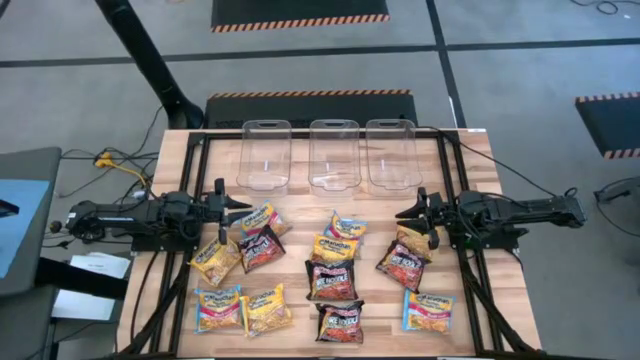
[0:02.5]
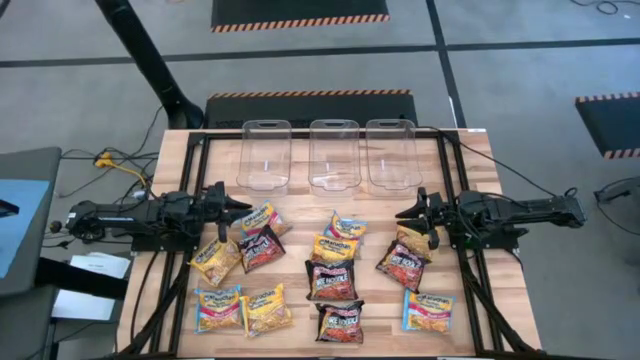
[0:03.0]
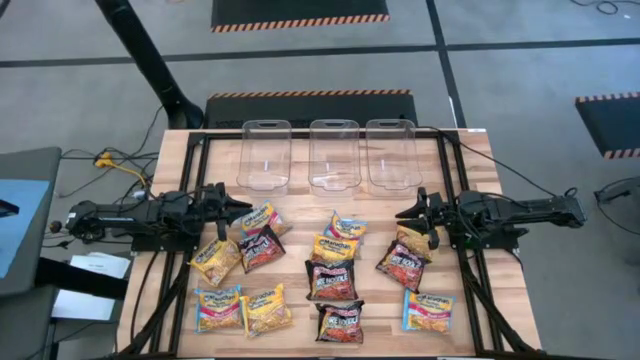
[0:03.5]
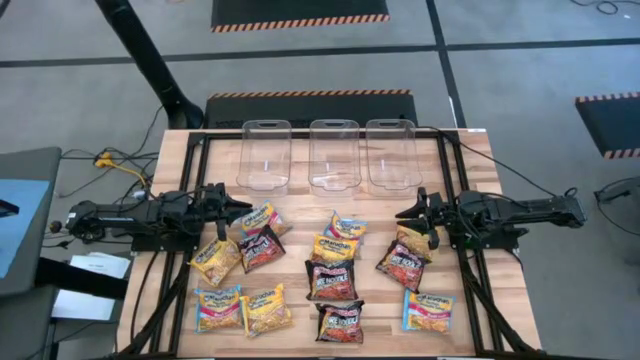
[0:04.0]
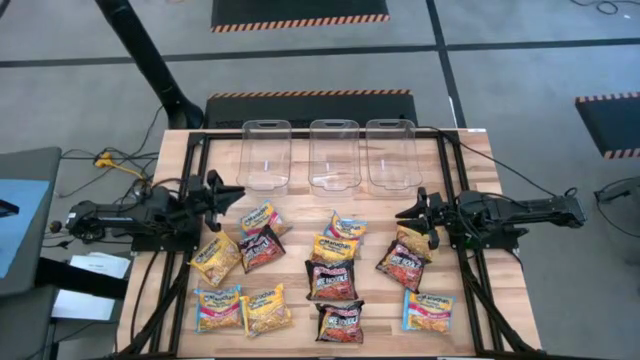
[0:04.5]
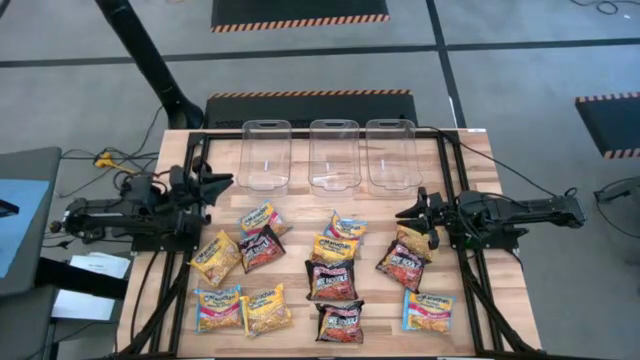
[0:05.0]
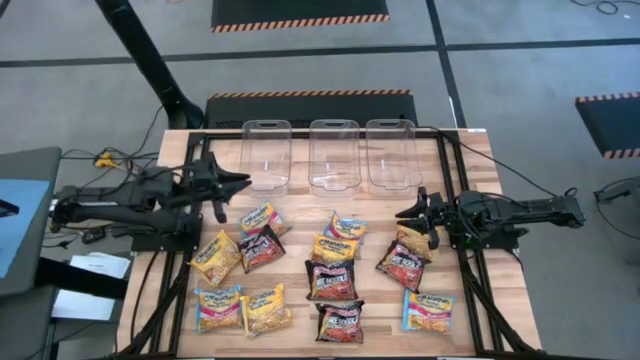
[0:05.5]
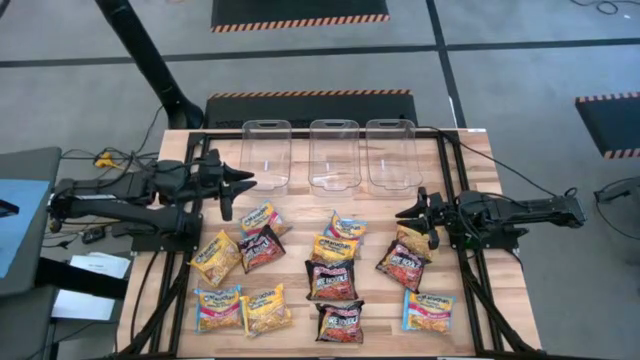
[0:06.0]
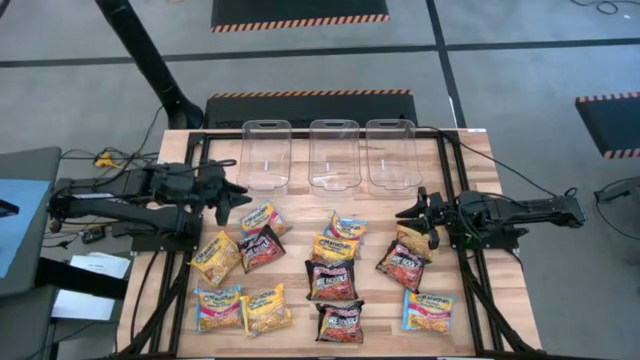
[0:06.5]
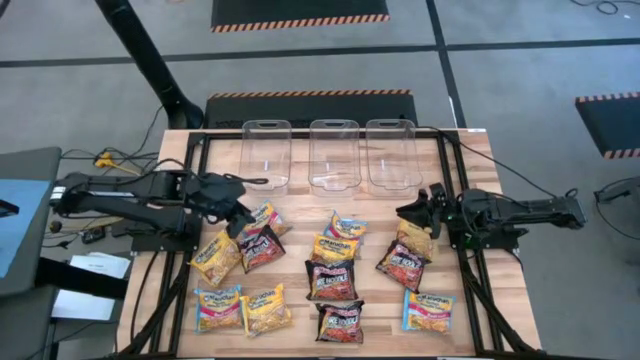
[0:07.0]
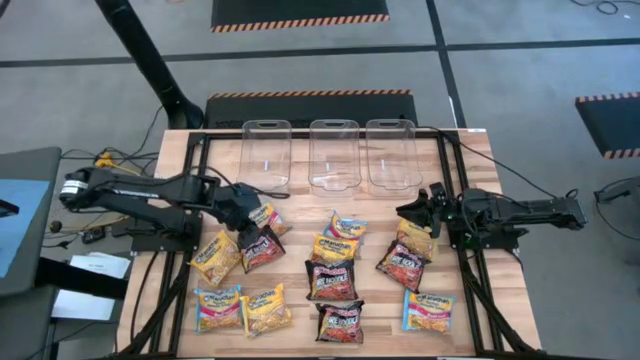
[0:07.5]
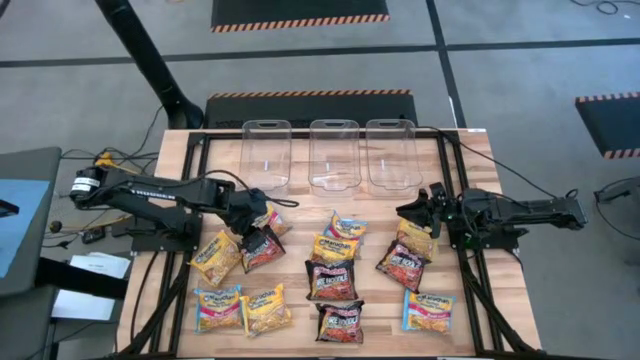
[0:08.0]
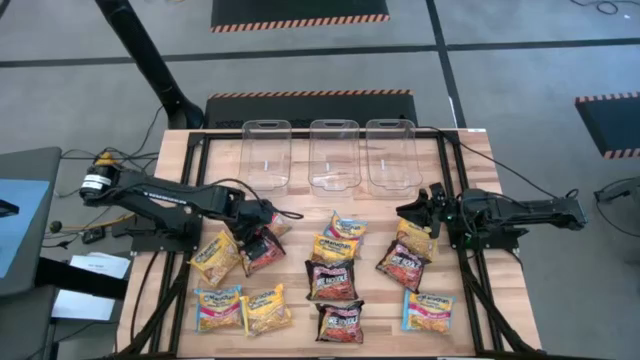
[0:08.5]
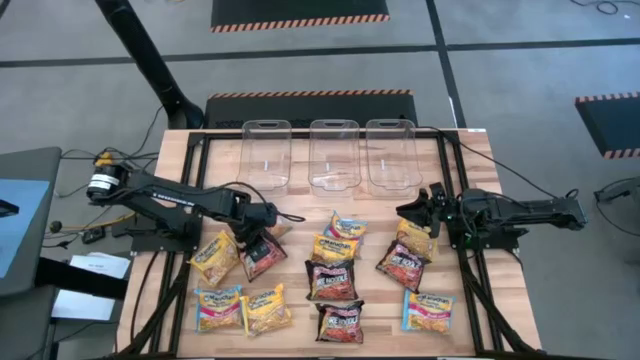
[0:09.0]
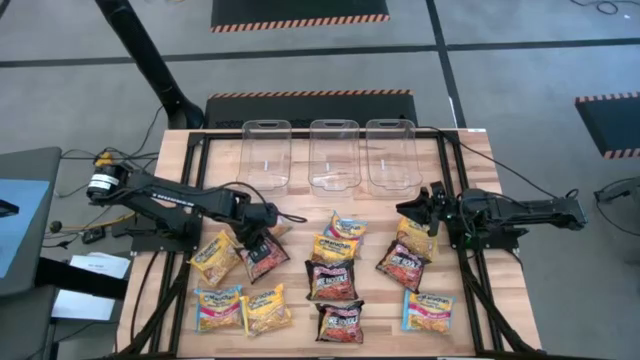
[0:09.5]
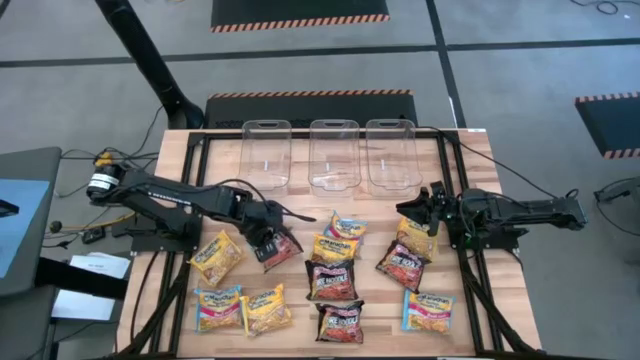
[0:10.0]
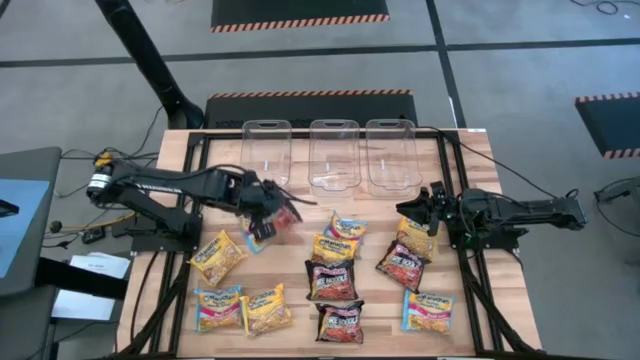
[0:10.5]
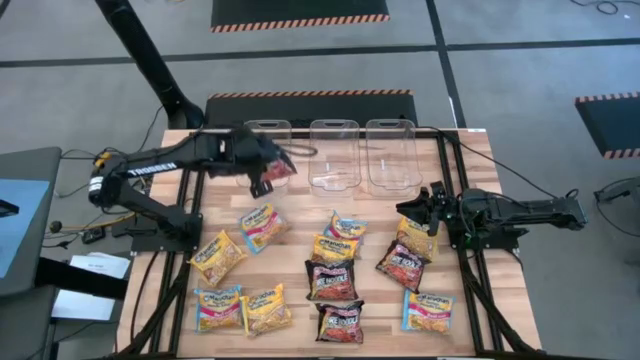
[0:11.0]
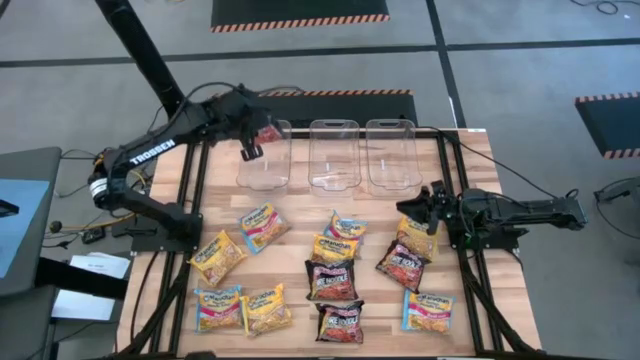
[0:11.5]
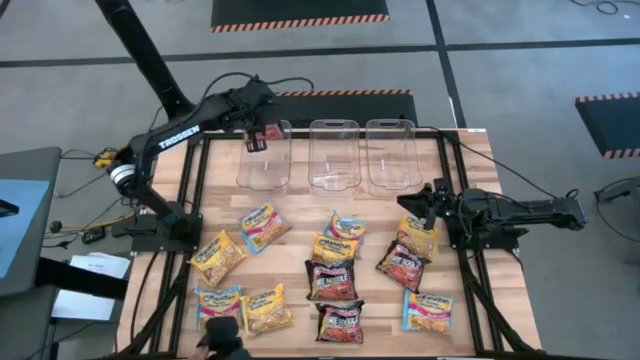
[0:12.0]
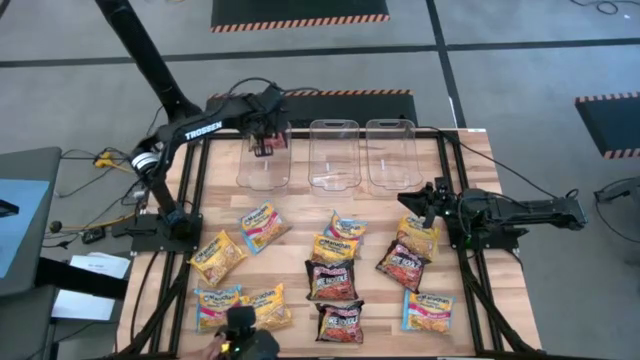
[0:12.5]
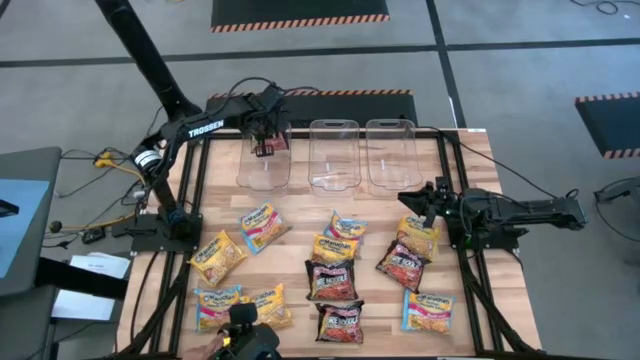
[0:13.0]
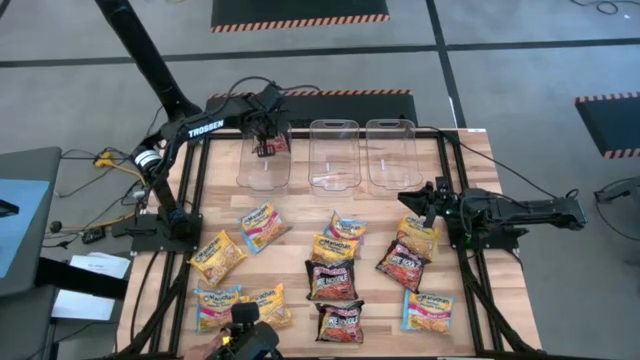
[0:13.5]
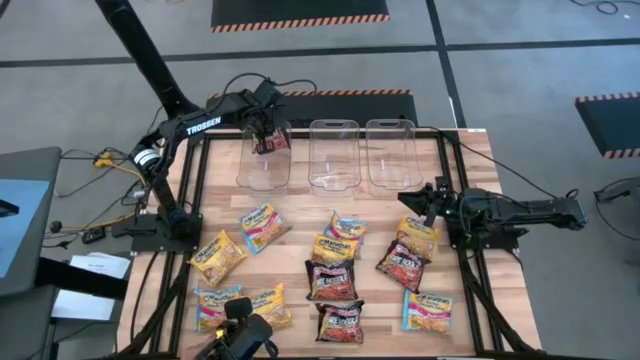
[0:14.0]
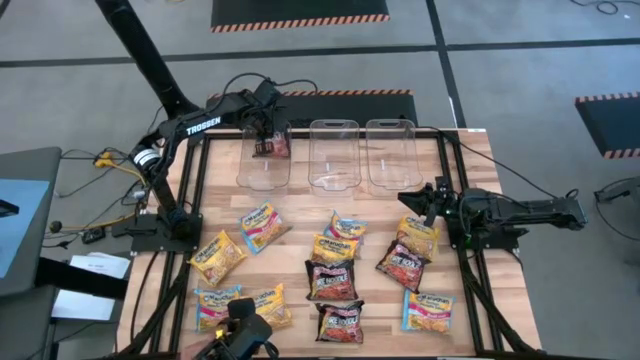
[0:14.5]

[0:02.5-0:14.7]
Task: Sort Maruchan noodles
Put the black noodle pack into the left transparent bin

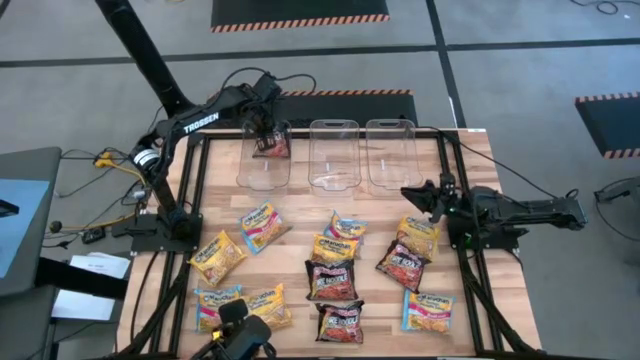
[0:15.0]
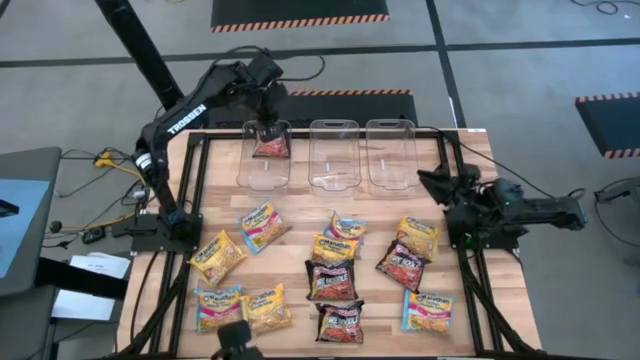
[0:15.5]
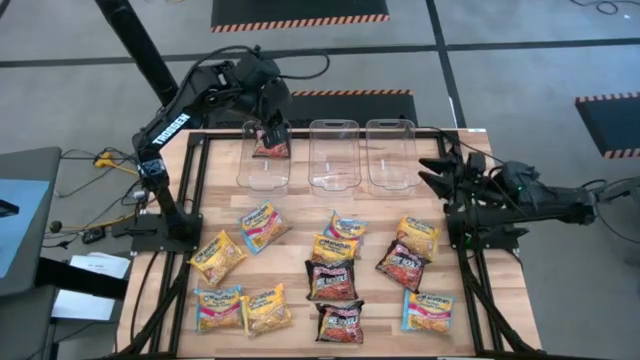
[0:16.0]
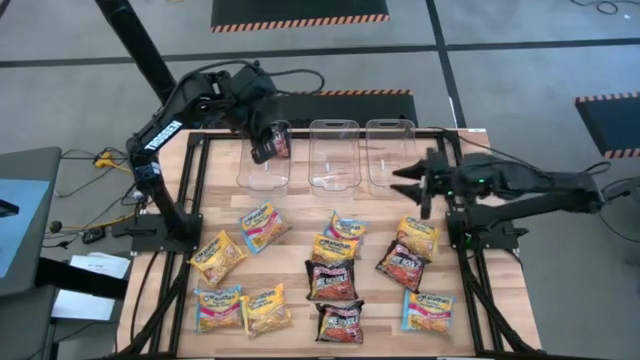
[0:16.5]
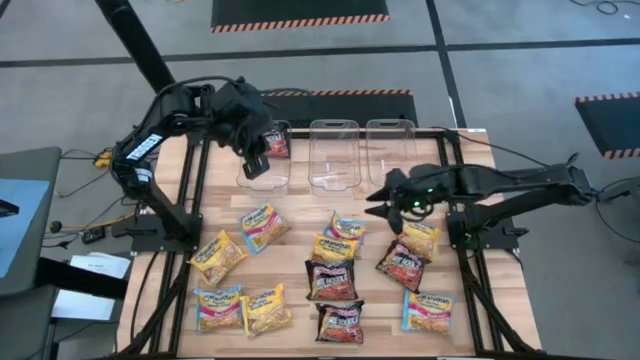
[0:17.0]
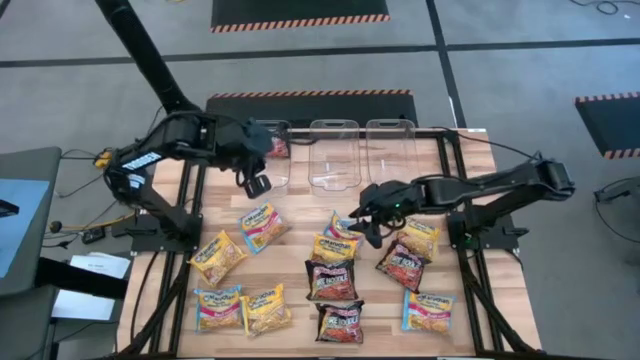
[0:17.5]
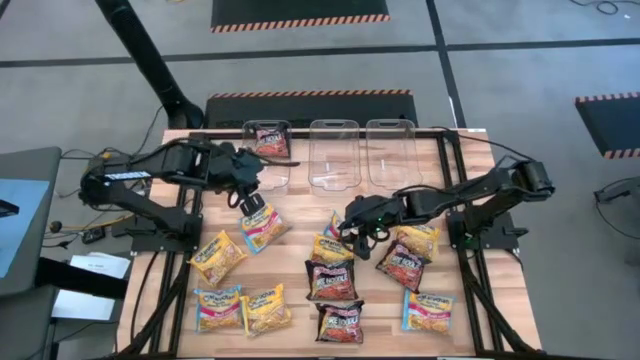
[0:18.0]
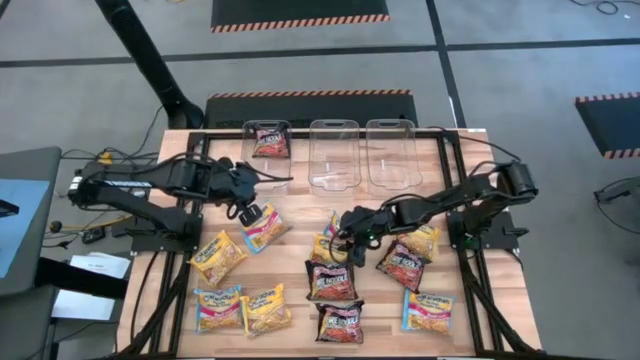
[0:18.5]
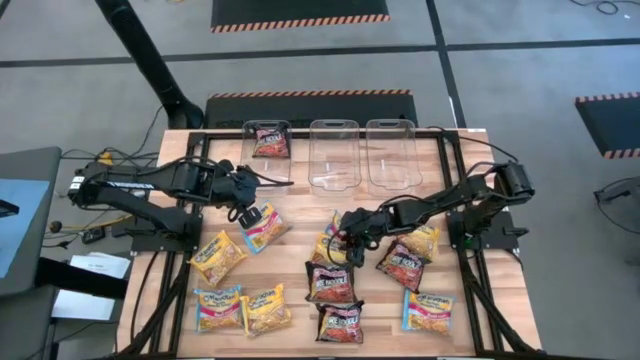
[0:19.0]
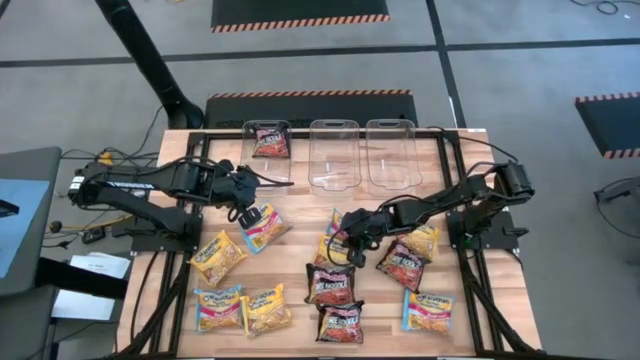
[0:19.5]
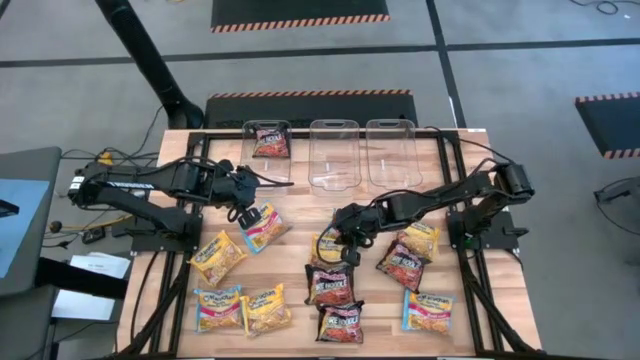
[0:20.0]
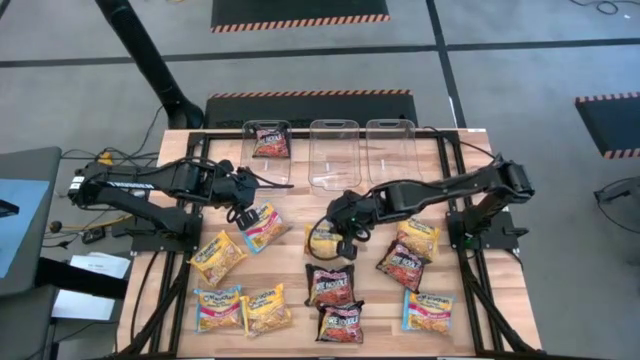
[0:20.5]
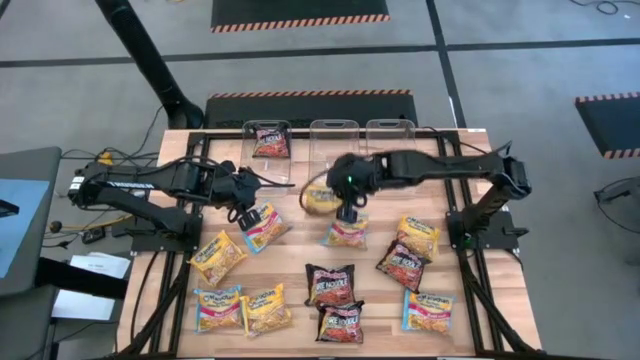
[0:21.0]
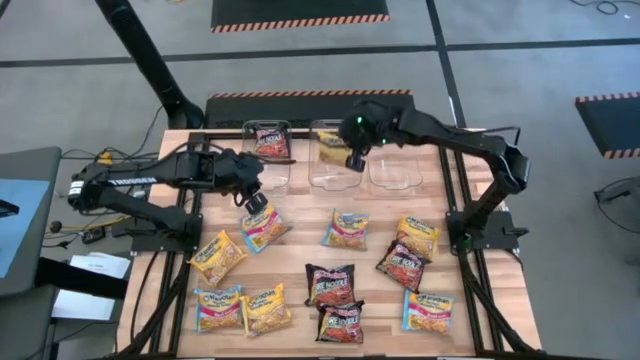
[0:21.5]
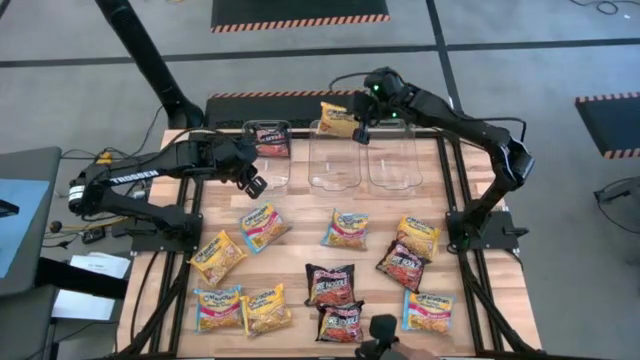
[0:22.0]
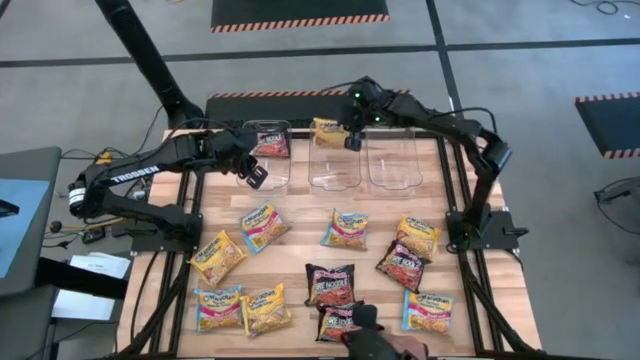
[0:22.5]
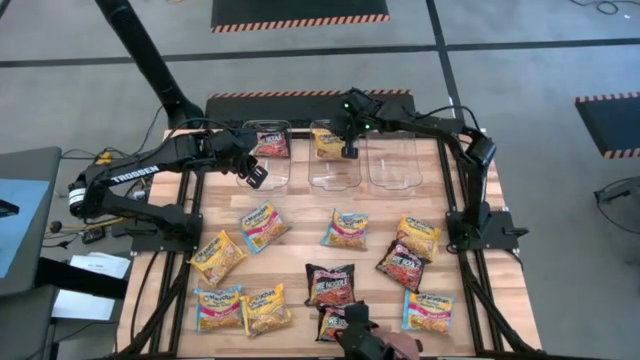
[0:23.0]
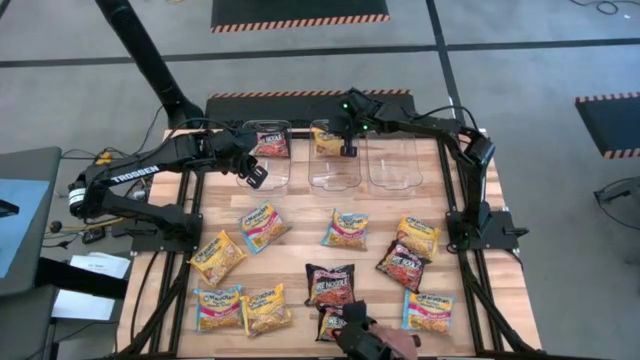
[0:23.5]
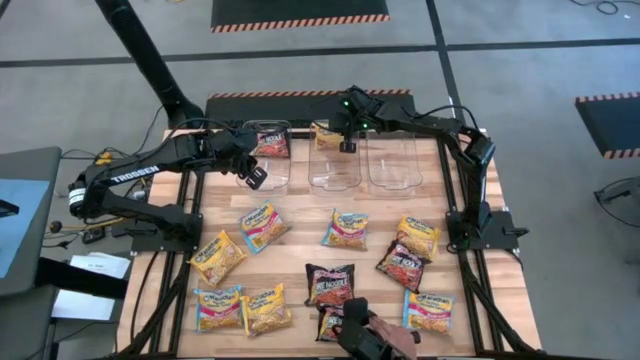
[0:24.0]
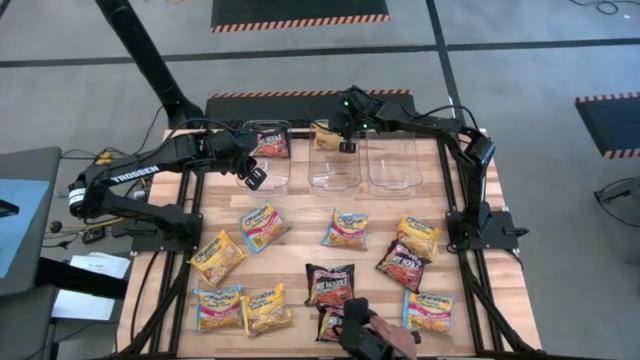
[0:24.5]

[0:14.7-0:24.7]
Put the yellow noodle pack into the center transparent bin
